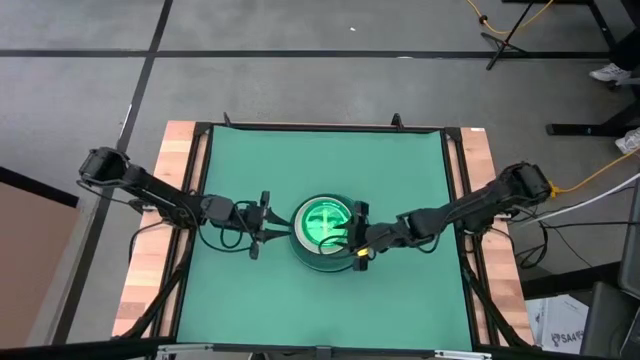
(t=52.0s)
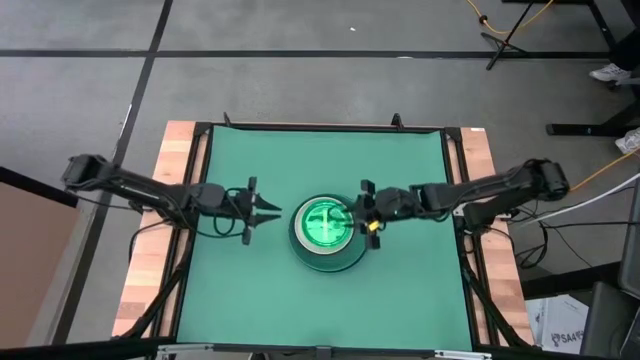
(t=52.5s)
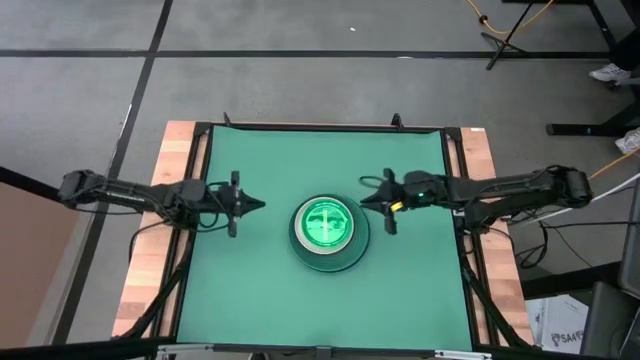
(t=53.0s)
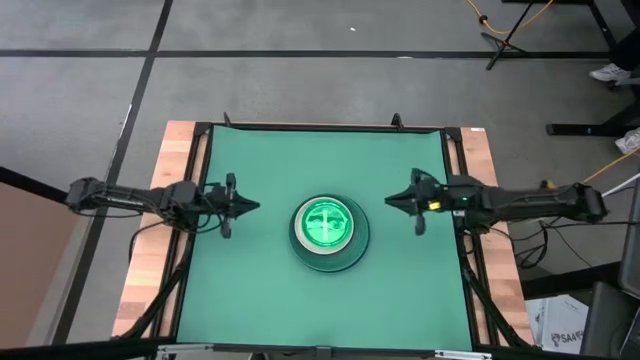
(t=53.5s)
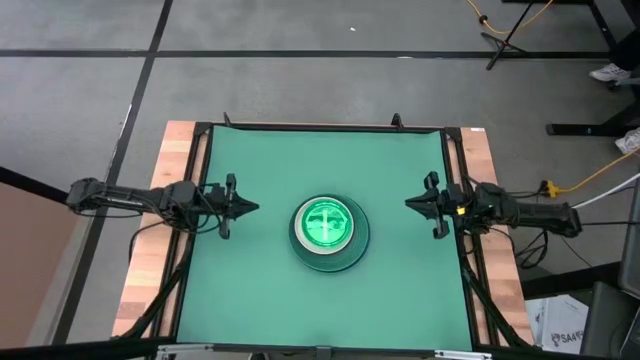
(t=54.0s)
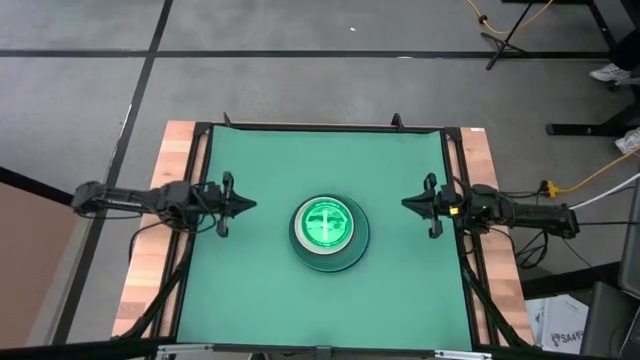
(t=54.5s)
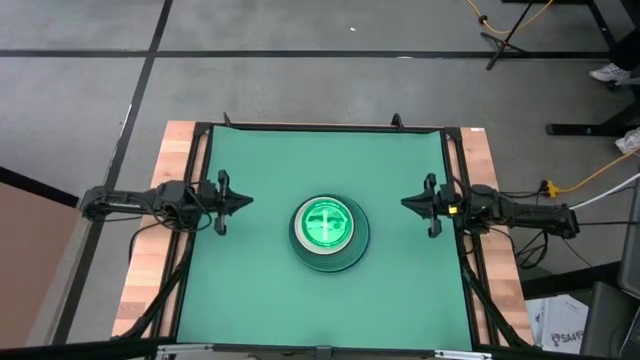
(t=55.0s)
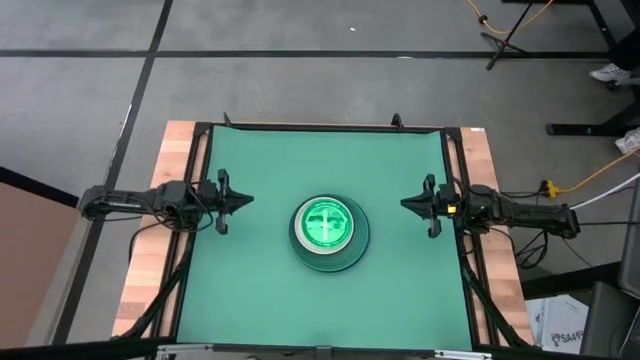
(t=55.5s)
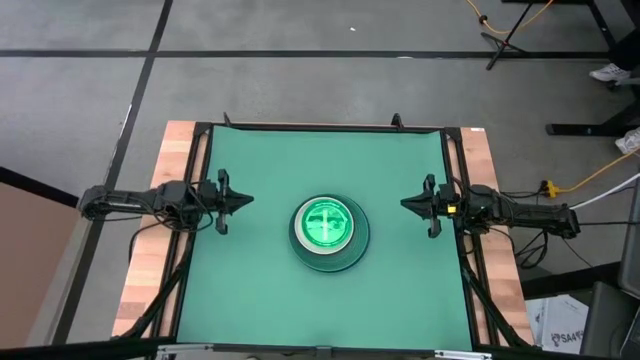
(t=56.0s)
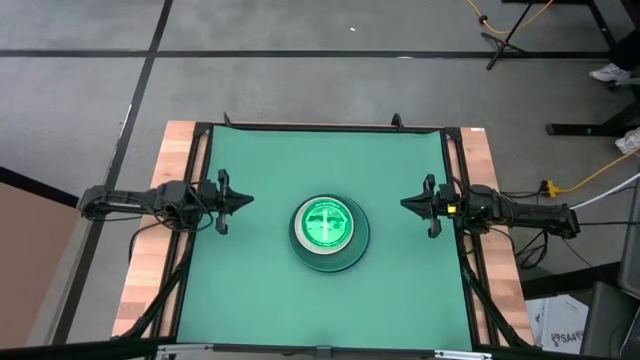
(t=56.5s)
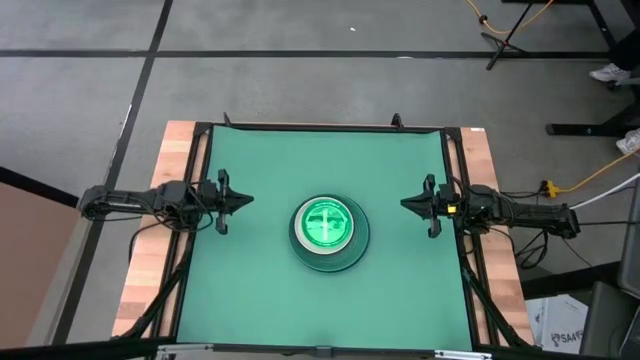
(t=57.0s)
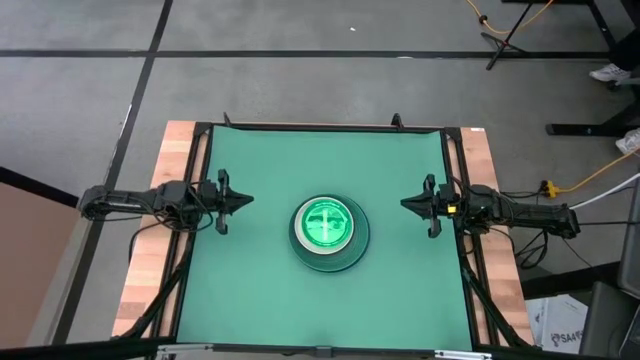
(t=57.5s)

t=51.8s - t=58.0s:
Task: Stack plastic plates
Return to Home Position

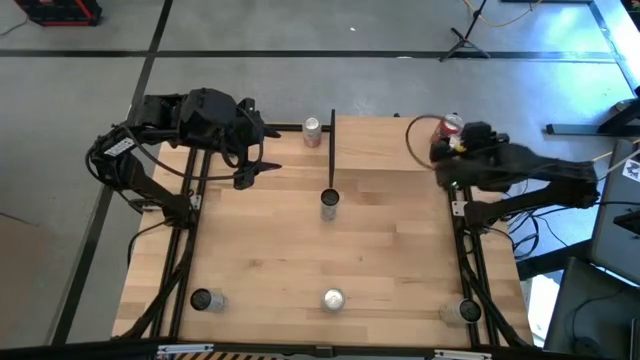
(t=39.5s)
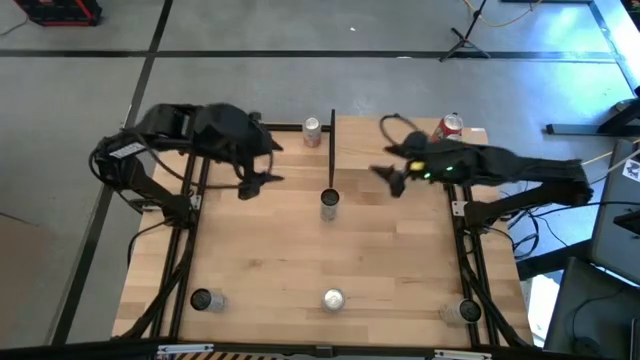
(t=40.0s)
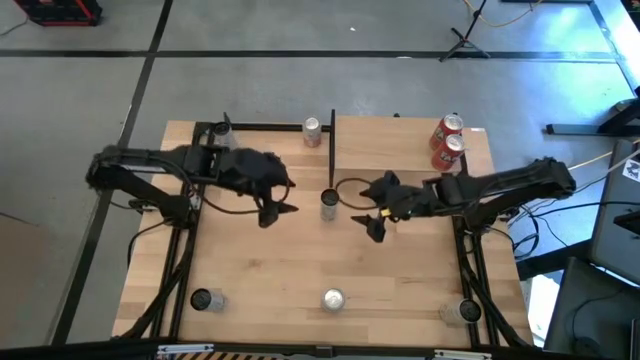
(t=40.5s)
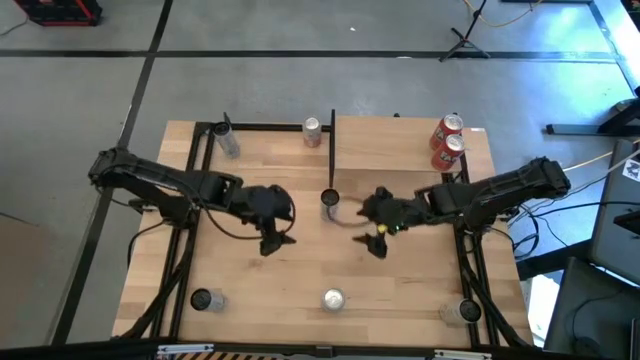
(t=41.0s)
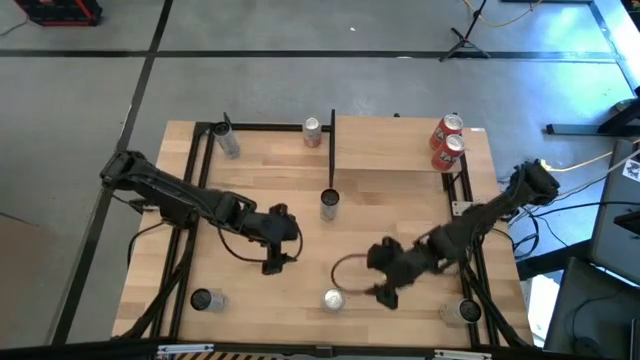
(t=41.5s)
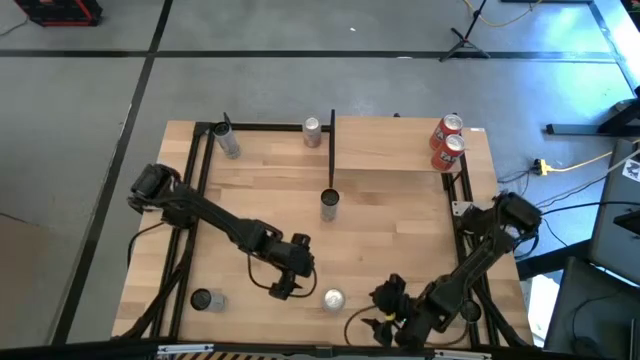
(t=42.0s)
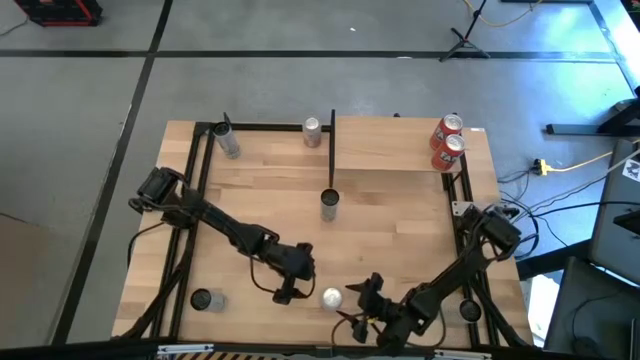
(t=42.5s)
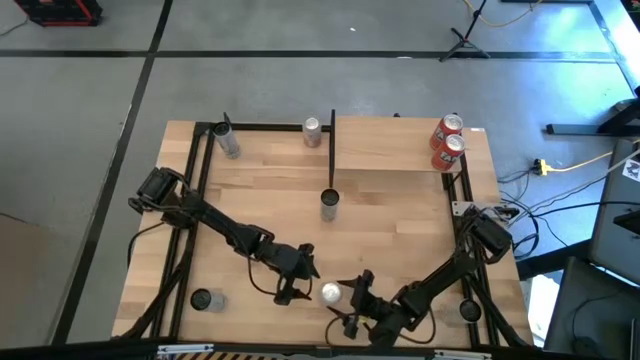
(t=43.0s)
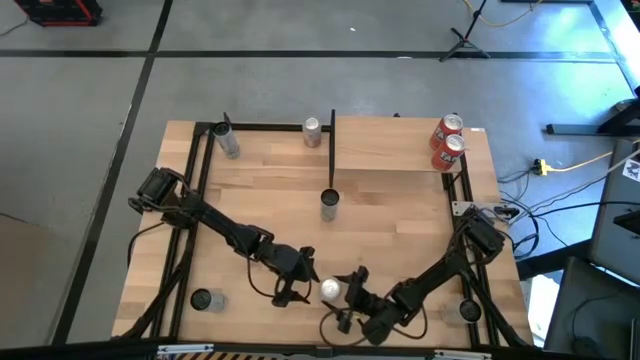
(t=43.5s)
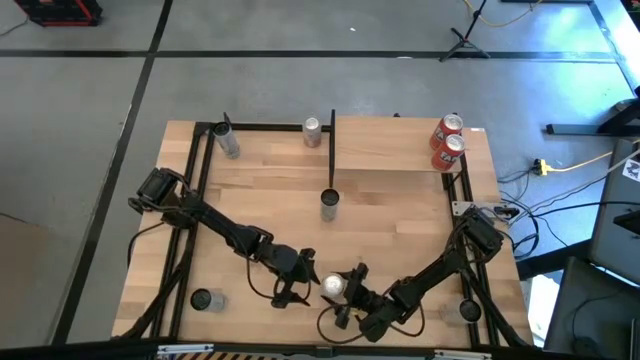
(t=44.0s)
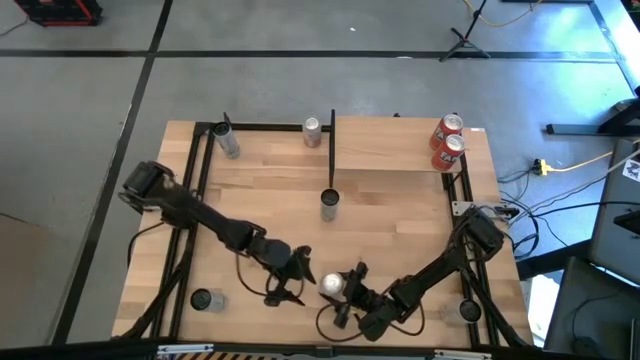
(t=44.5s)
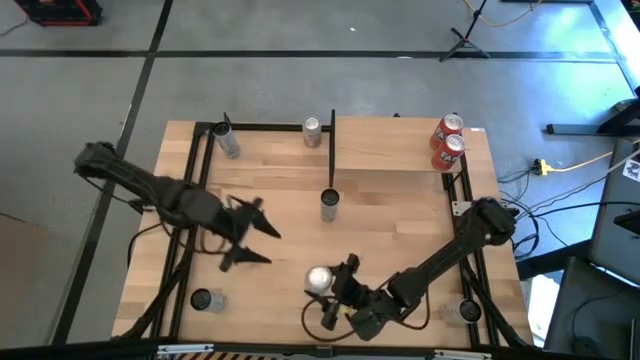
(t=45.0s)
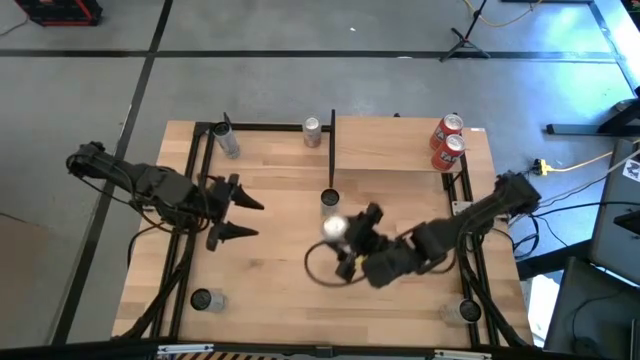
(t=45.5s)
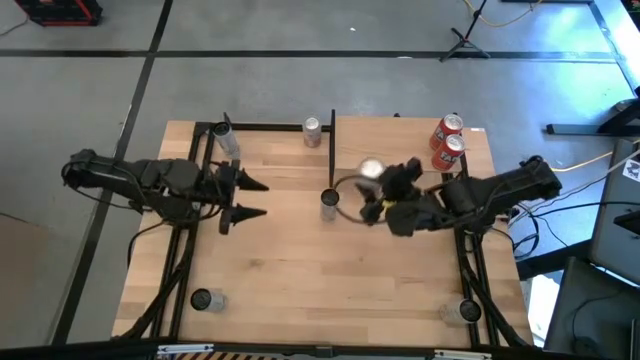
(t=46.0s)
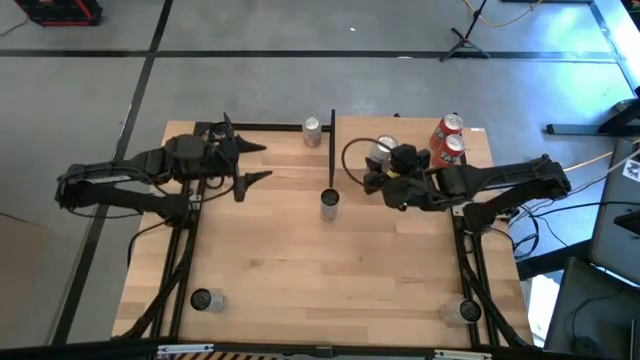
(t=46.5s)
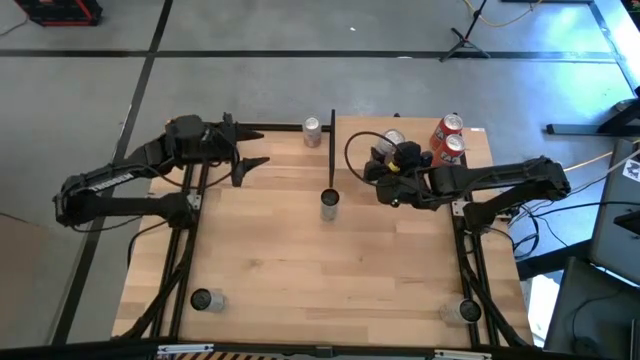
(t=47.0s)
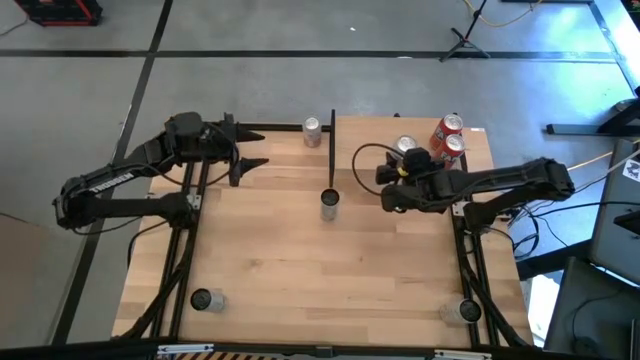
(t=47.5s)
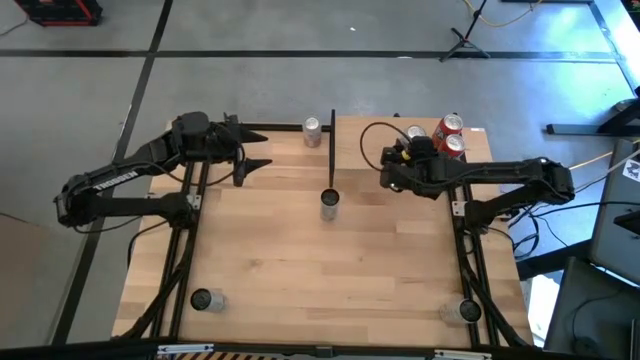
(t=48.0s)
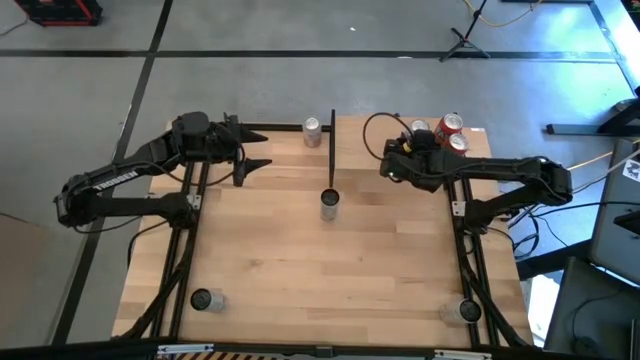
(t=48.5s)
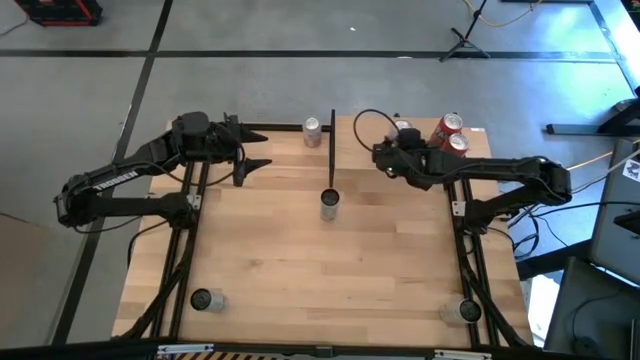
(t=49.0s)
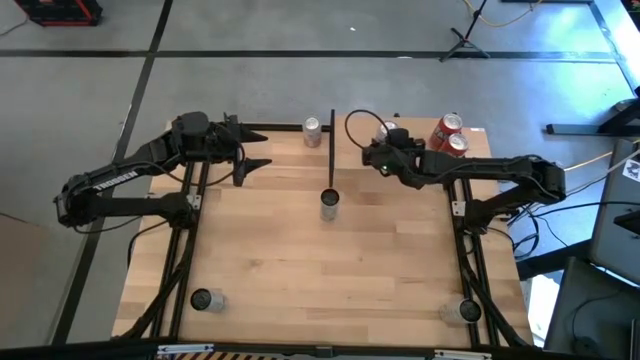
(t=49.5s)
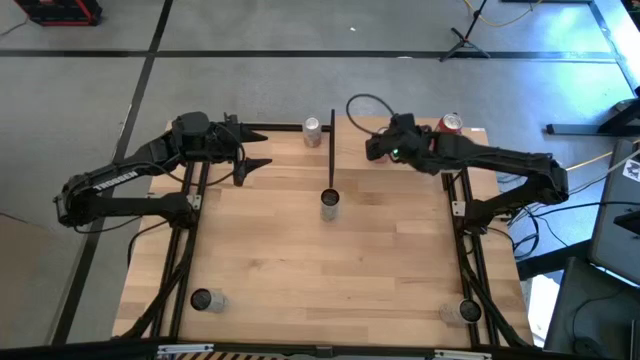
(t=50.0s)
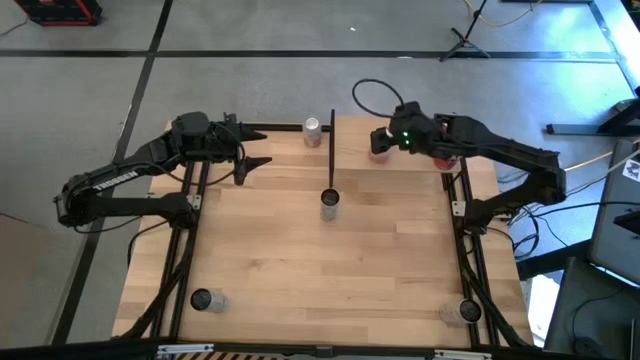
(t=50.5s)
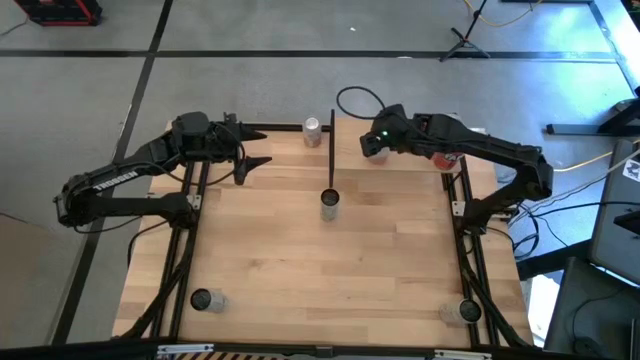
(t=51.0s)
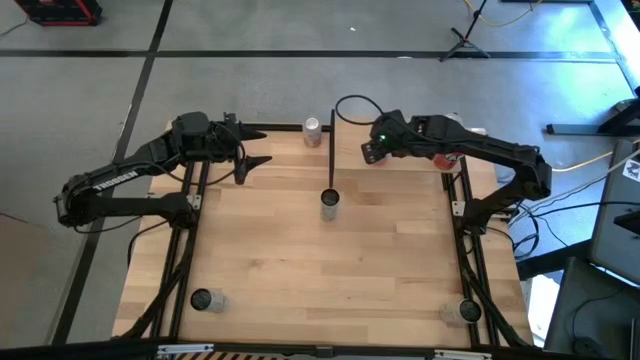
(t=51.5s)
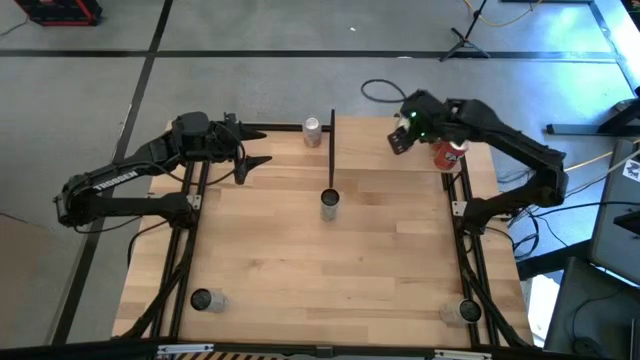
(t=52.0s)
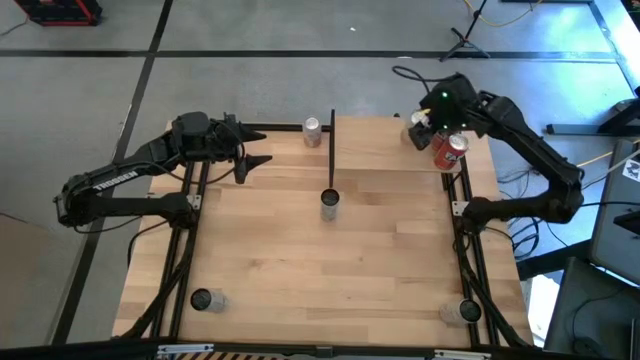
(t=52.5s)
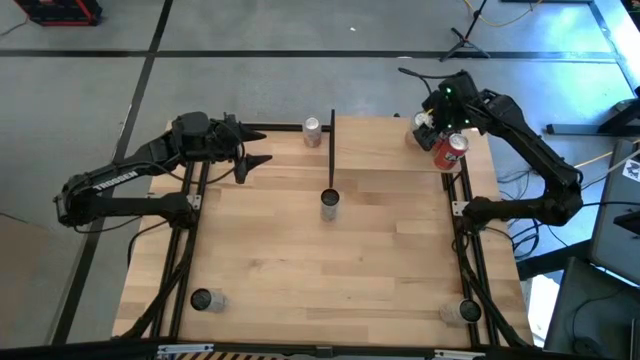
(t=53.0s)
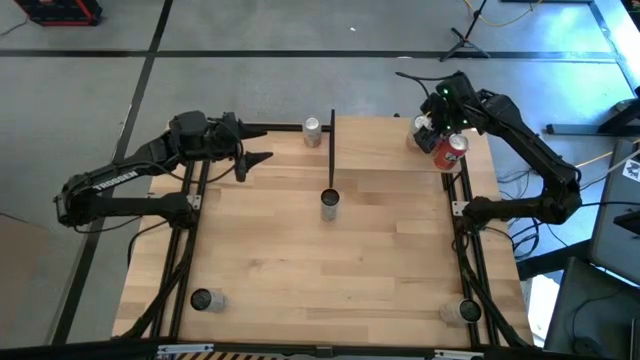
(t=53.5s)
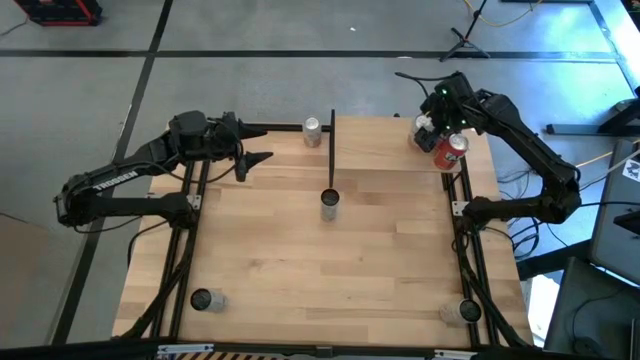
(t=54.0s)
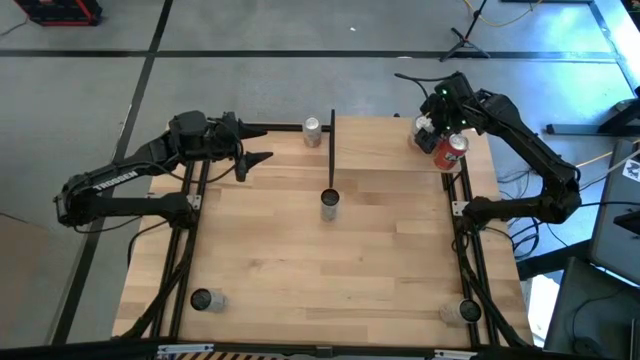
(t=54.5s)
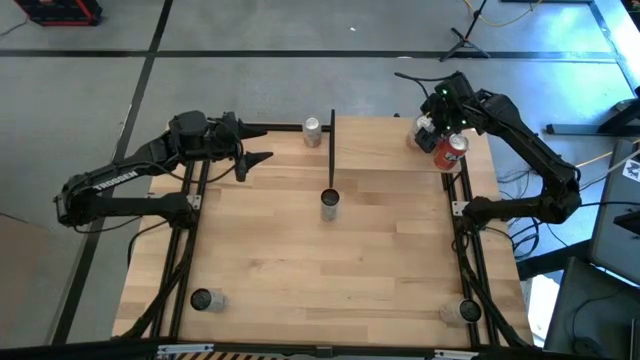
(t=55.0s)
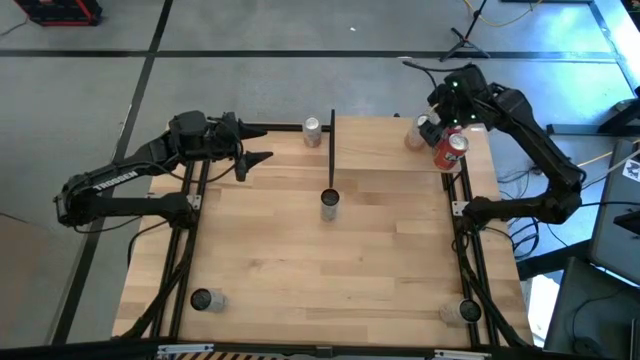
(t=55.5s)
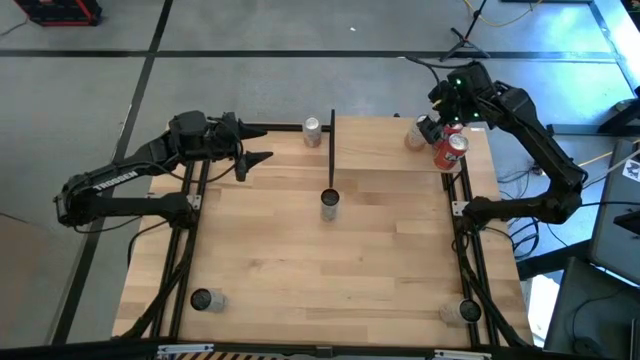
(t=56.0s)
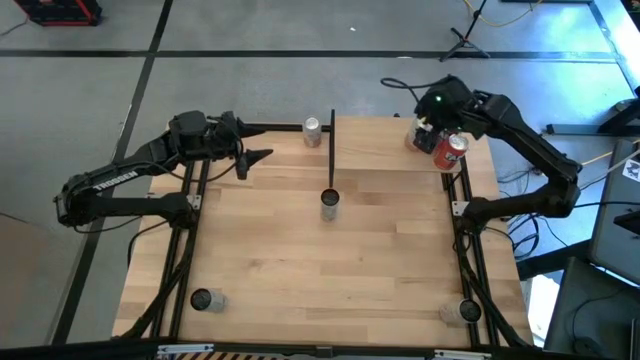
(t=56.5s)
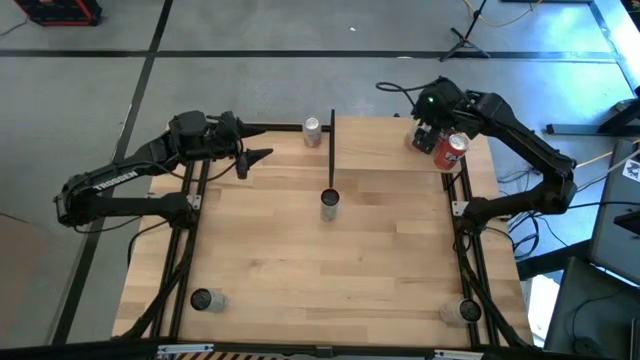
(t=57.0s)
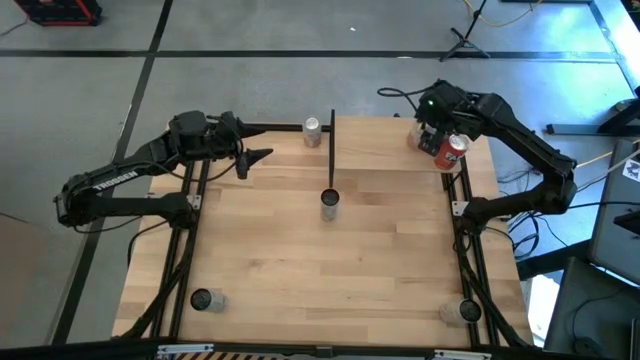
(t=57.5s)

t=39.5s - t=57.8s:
Task: Place canned beverage on shelf
Put the bottom orange soda can on the shelf
